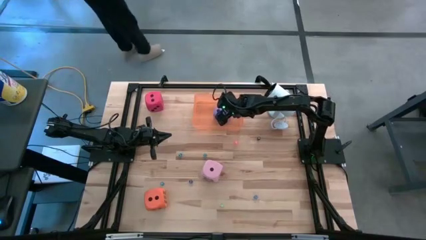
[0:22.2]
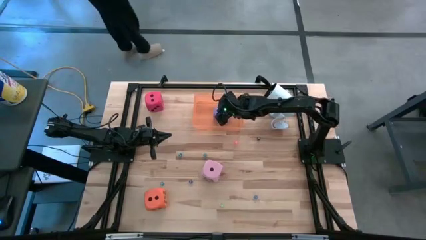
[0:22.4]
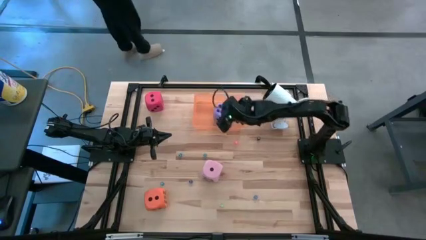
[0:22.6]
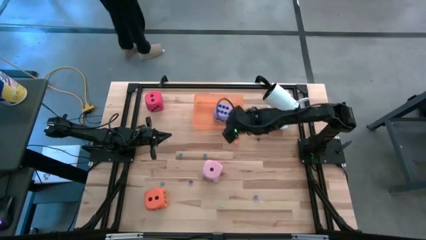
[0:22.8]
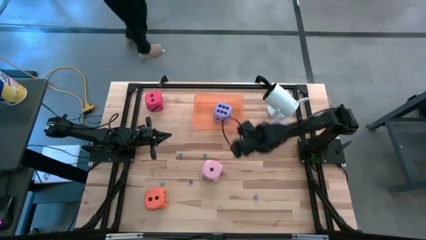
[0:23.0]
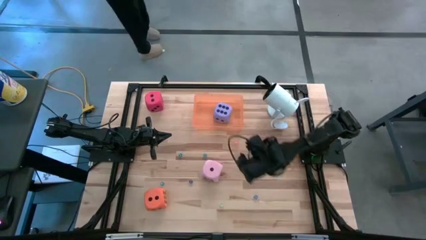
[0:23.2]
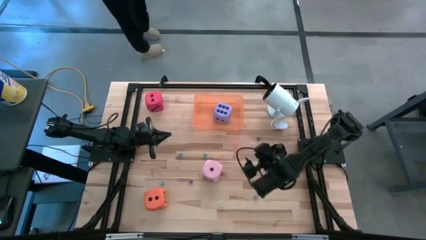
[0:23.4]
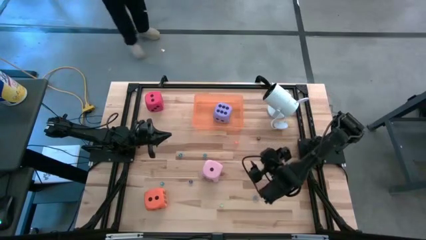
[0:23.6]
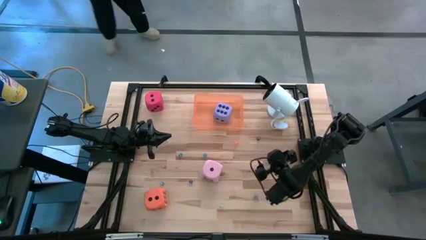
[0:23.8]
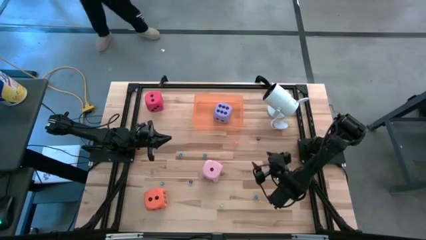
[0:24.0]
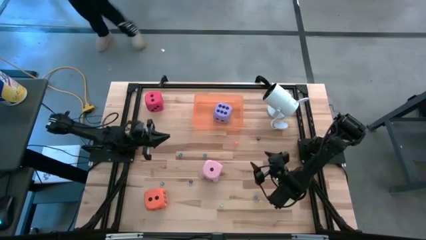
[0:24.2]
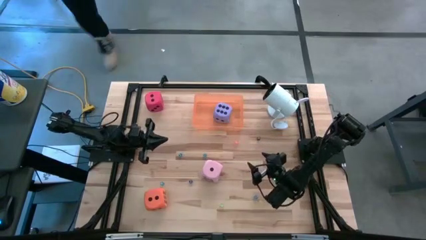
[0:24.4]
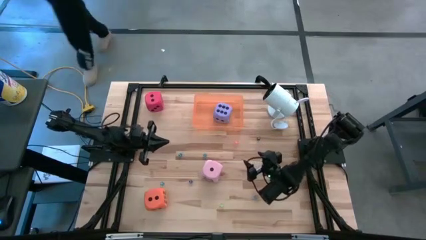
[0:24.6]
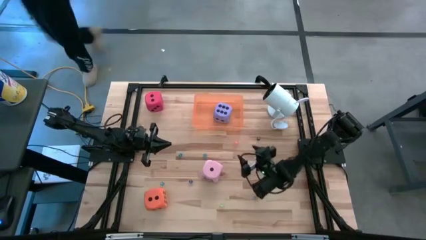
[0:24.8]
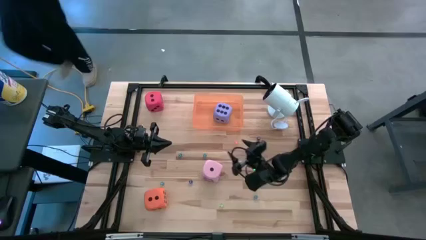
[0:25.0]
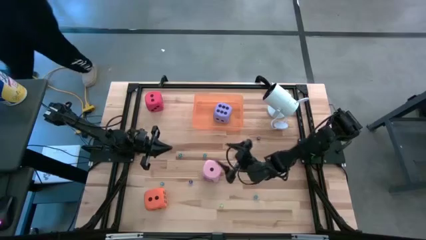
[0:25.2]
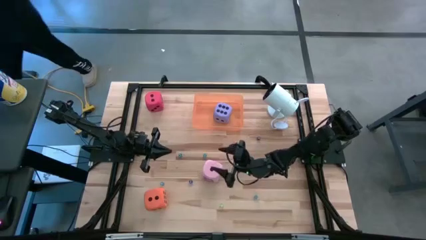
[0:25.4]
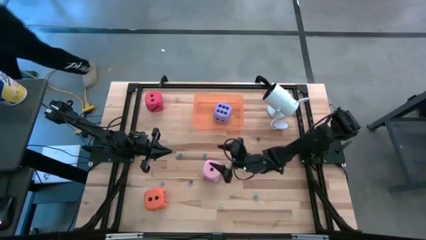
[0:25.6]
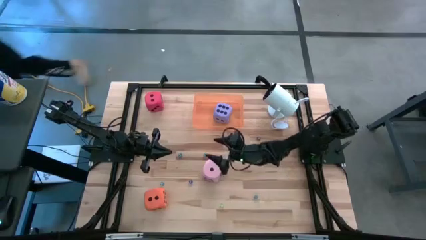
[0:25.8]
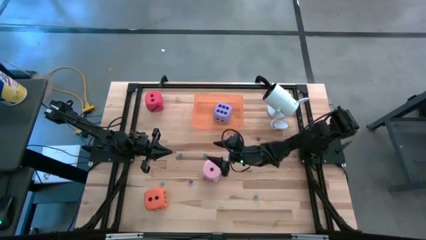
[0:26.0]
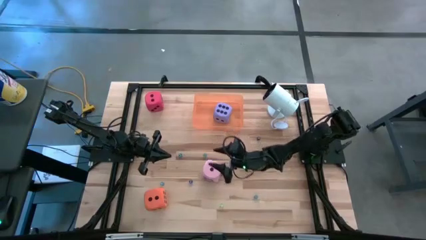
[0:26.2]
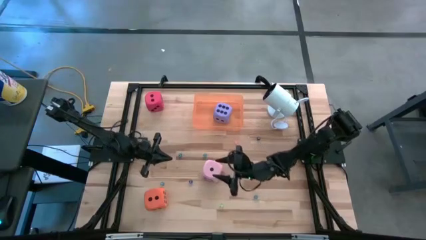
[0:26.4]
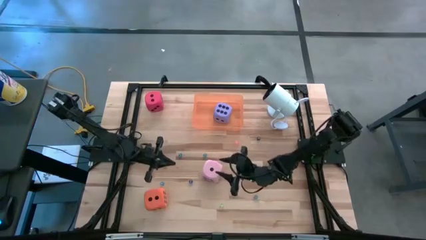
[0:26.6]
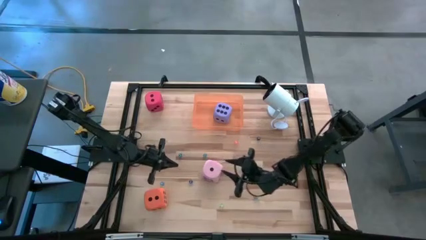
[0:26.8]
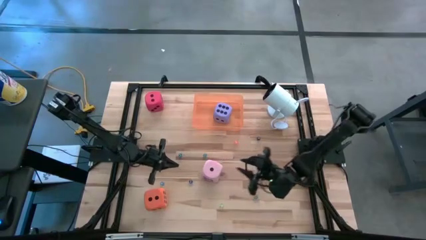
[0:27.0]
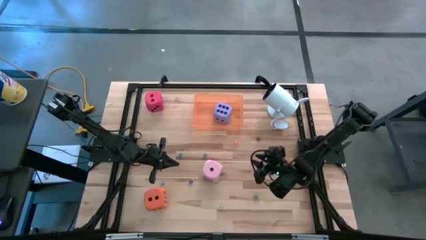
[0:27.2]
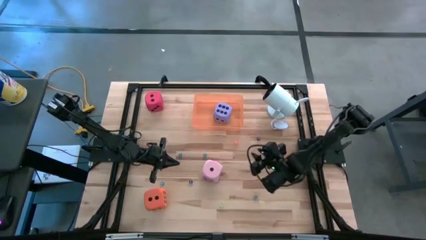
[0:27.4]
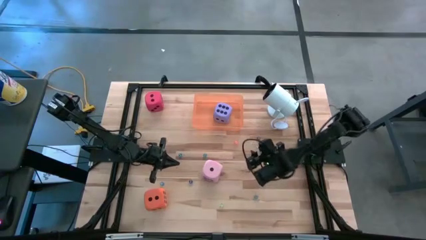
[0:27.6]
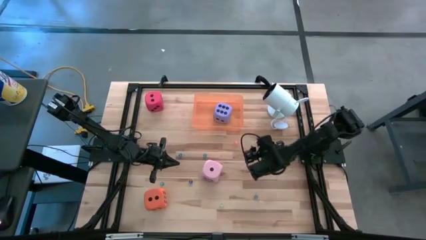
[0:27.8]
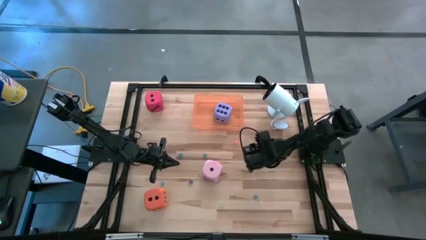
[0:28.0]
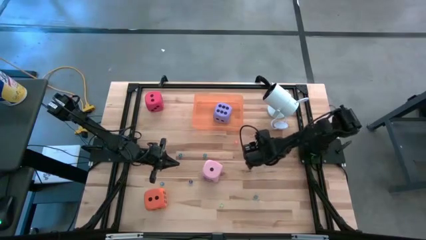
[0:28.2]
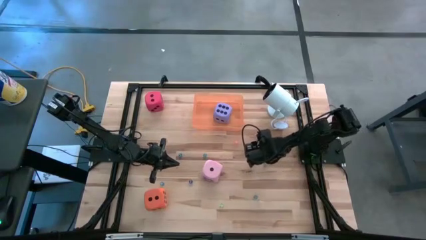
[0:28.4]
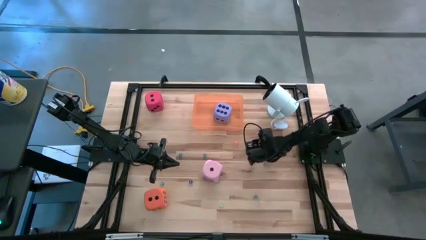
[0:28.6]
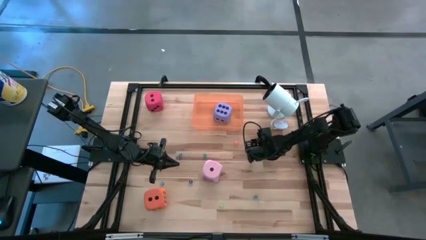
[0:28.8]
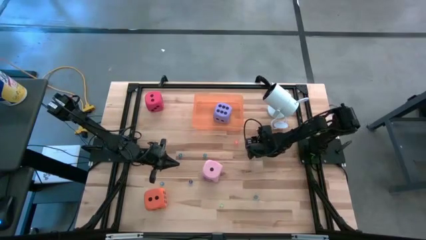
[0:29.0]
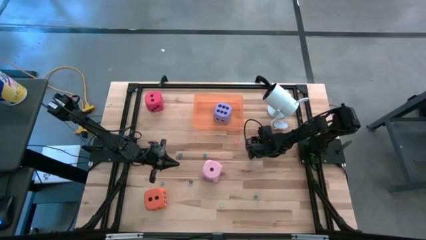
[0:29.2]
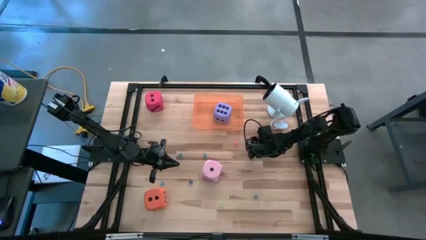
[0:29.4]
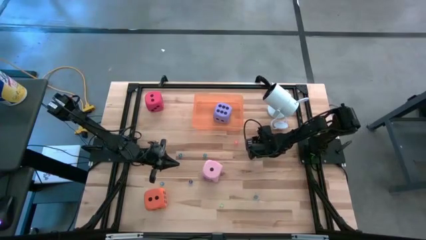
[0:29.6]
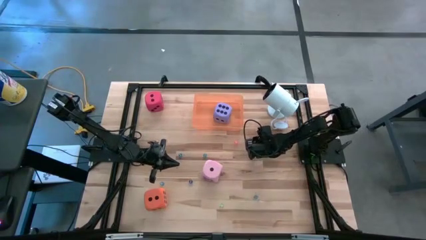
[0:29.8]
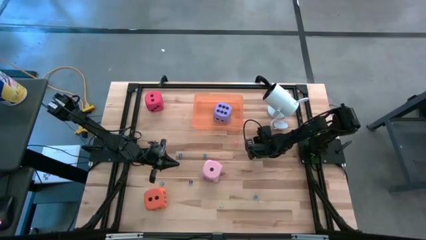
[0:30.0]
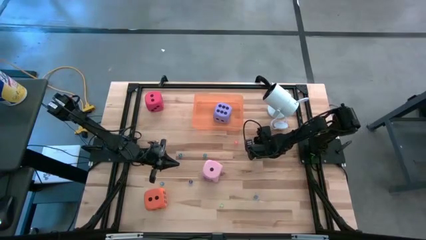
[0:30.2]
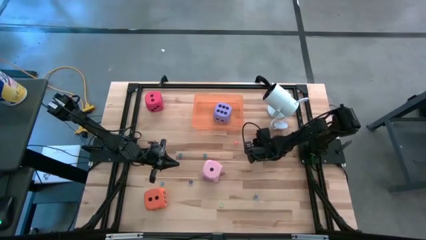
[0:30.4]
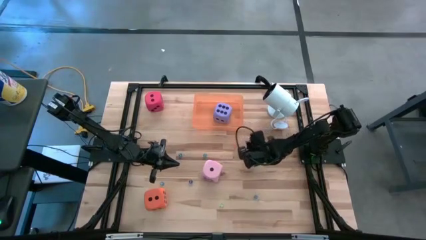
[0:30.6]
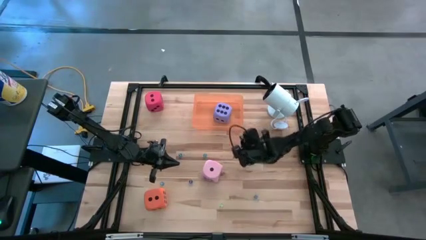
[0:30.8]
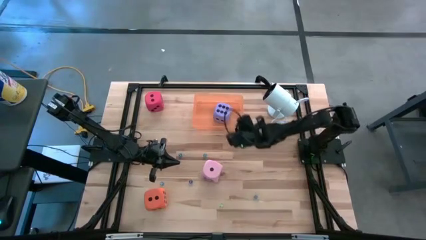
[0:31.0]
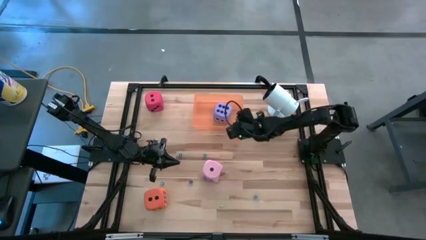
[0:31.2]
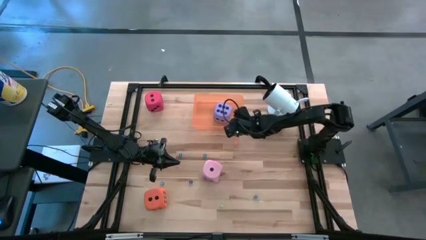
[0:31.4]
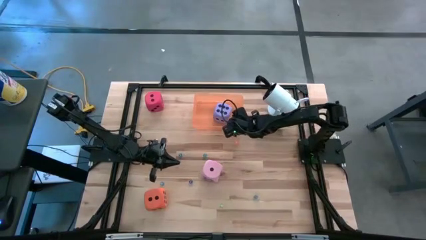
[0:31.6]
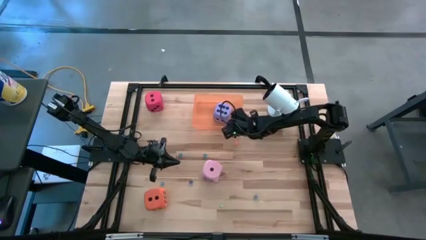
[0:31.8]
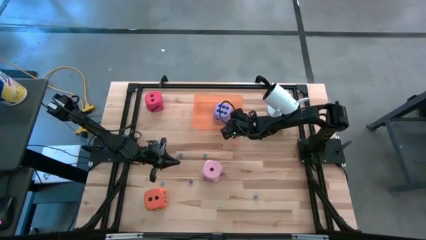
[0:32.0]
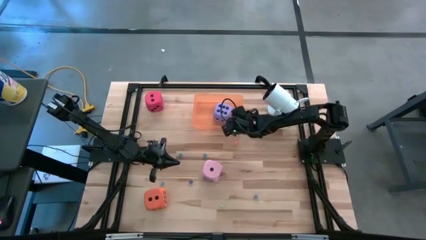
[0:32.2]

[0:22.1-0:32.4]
Task: Pick & Place Dice
Put the small black die into the orange bin

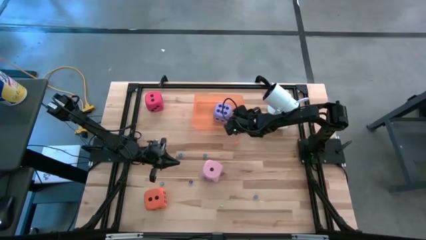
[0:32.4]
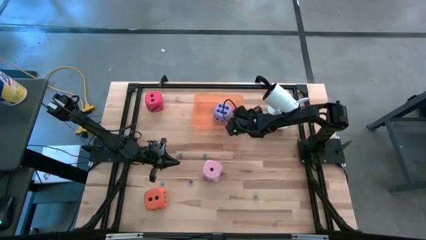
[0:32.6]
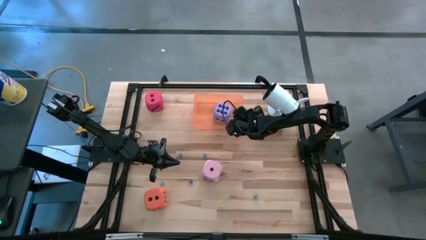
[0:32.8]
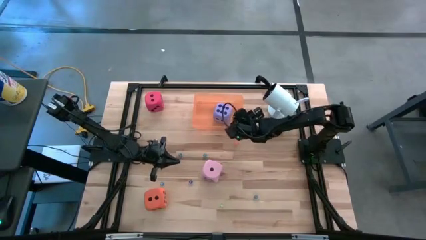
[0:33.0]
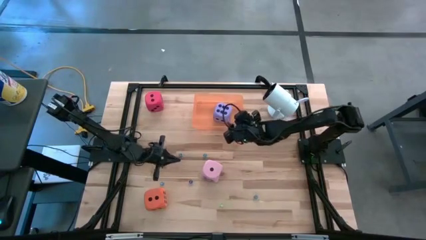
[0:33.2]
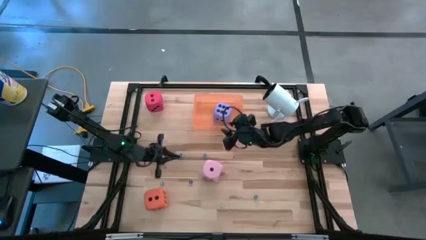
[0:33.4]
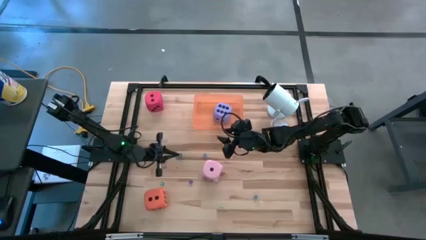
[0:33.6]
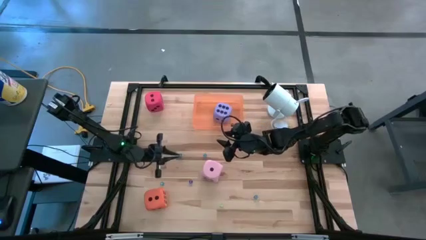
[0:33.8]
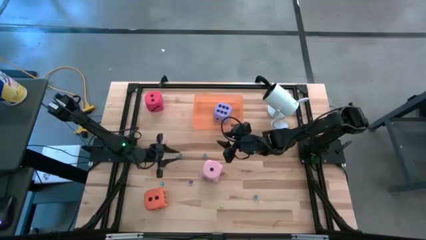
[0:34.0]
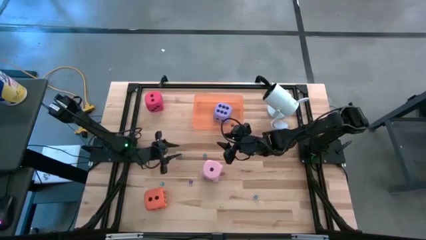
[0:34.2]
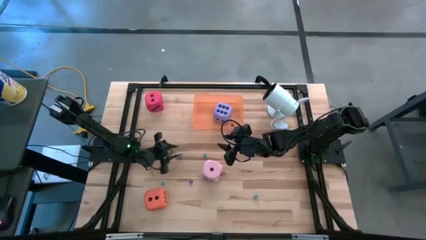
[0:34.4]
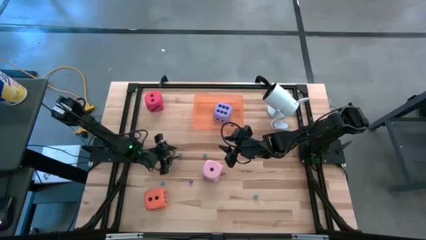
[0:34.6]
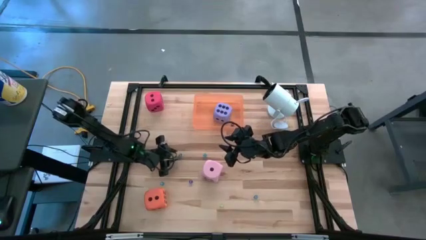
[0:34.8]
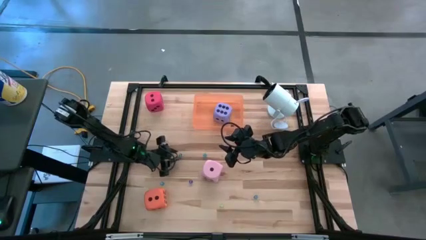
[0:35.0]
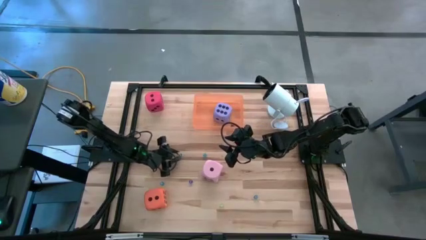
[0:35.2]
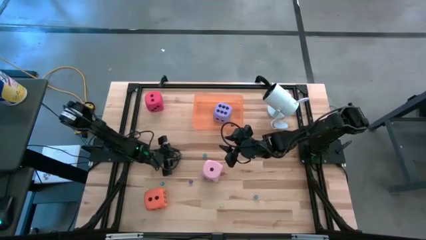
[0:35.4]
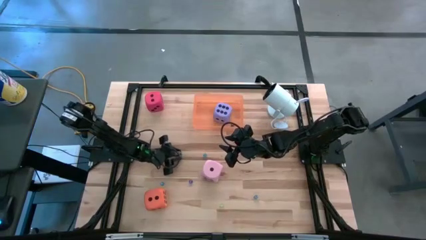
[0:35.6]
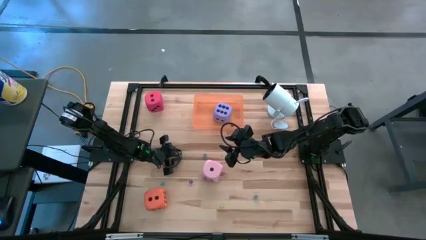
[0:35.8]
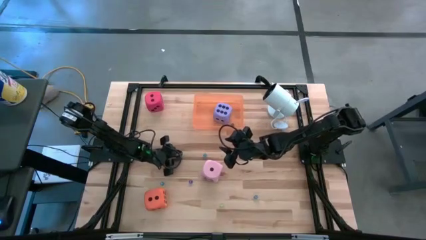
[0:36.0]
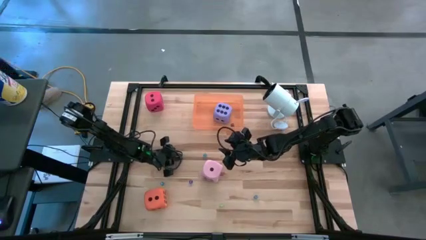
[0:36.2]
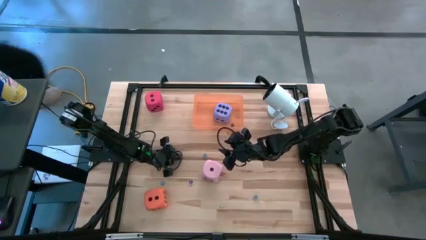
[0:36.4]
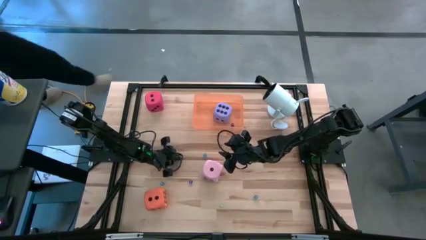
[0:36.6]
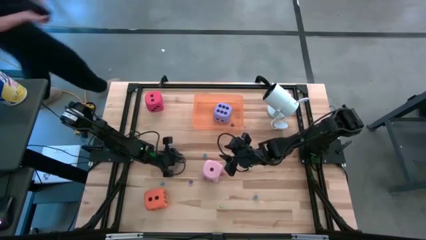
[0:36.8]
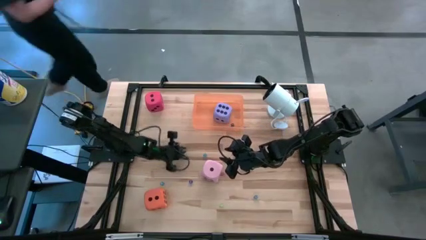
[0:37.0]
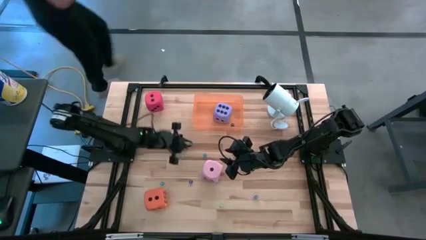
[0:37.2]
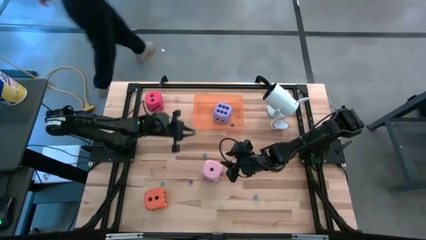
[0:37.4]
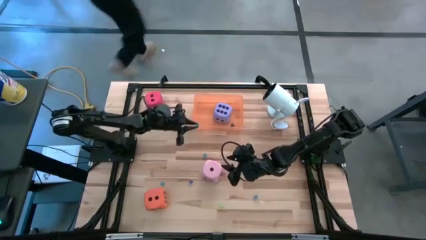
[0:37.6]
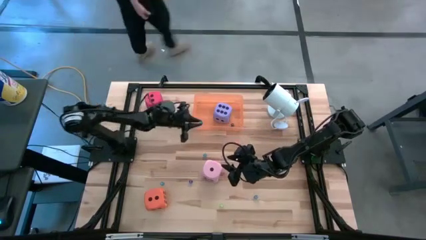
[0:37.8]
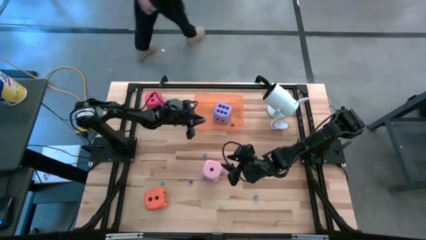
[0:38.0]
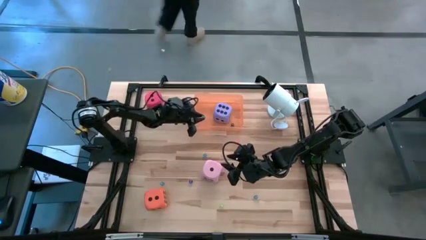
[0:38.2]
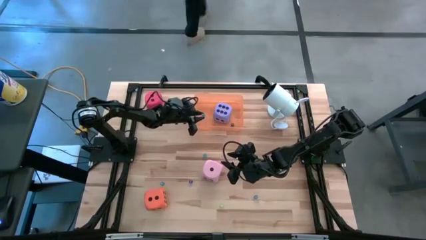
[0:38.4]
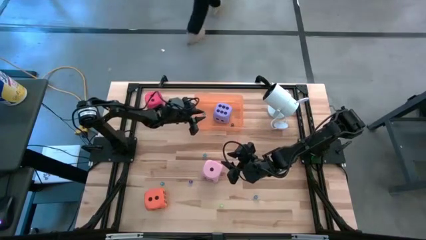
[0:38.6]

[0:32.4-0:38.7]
Put the small blue die into the orange bin
